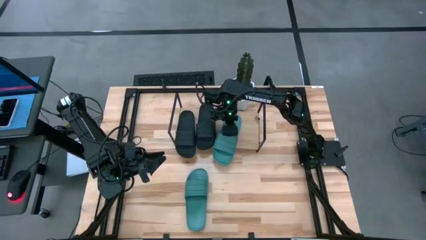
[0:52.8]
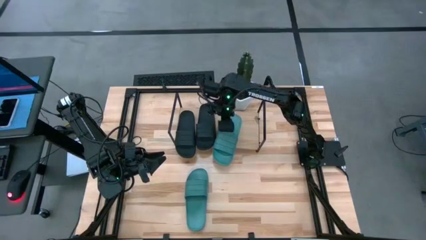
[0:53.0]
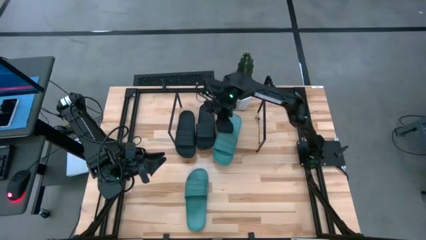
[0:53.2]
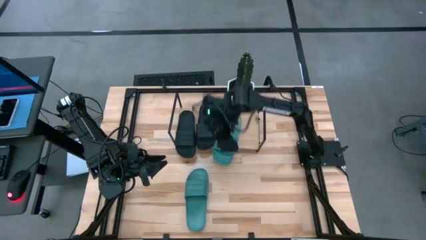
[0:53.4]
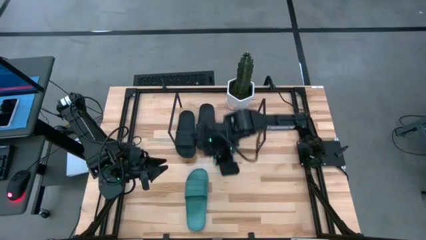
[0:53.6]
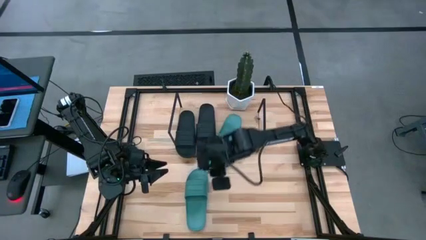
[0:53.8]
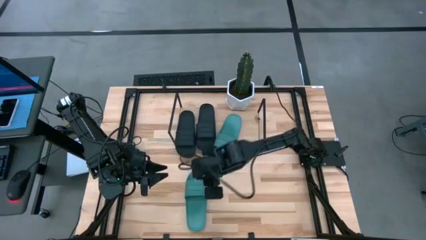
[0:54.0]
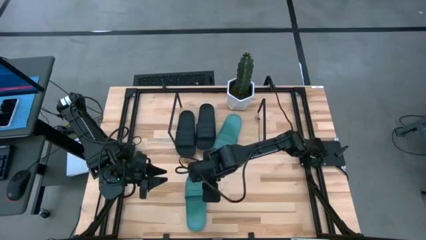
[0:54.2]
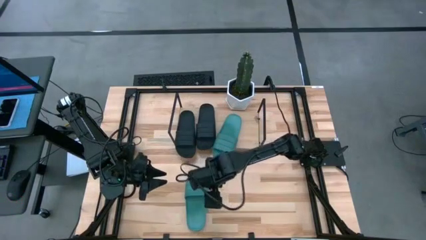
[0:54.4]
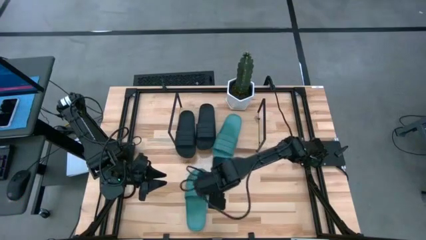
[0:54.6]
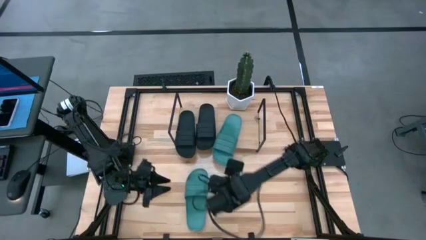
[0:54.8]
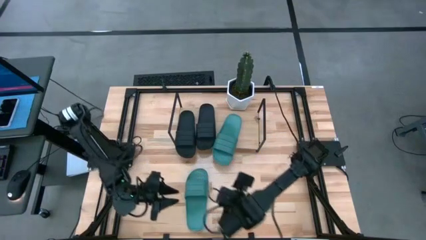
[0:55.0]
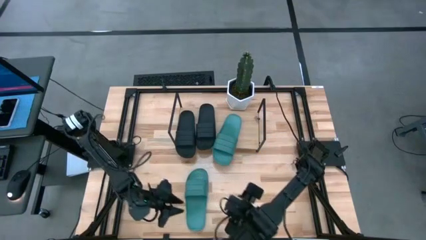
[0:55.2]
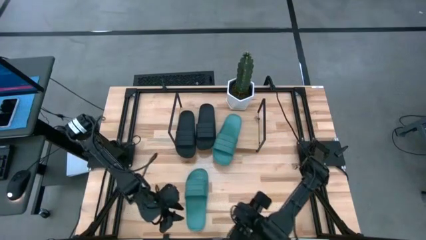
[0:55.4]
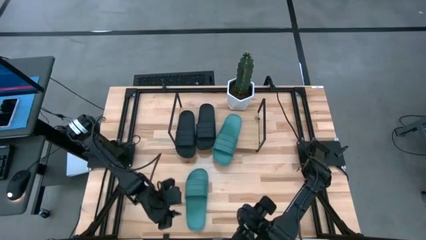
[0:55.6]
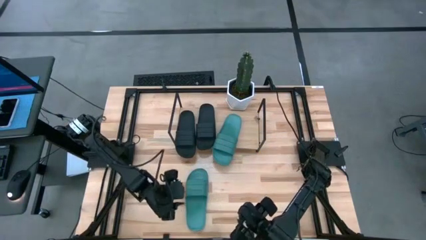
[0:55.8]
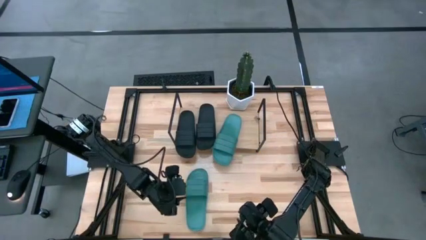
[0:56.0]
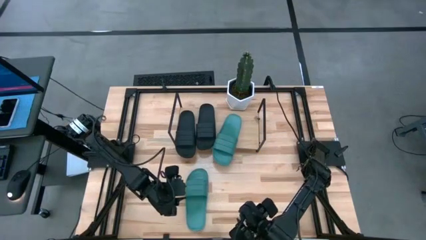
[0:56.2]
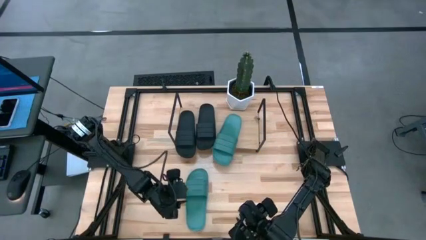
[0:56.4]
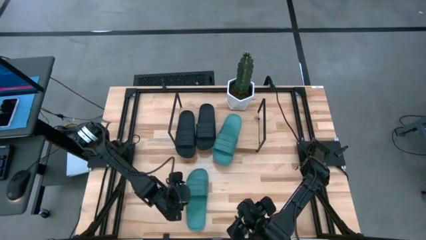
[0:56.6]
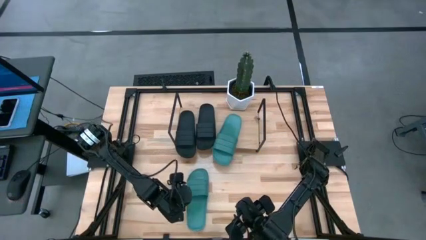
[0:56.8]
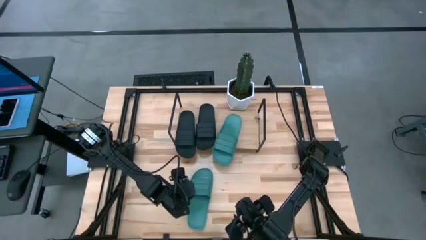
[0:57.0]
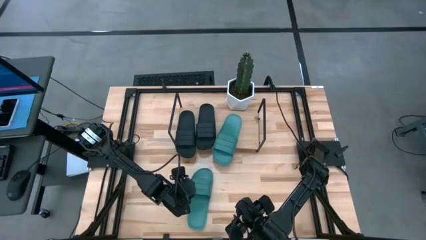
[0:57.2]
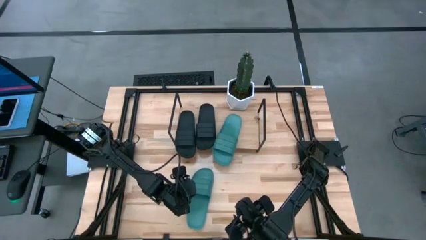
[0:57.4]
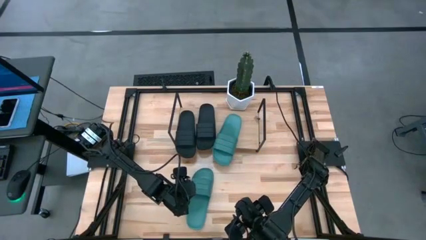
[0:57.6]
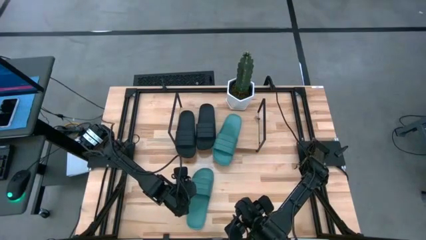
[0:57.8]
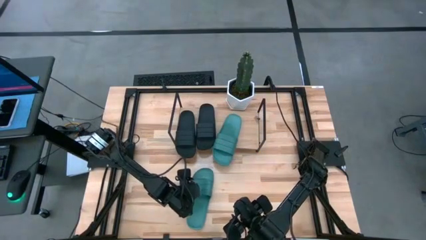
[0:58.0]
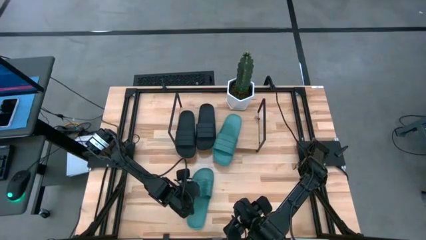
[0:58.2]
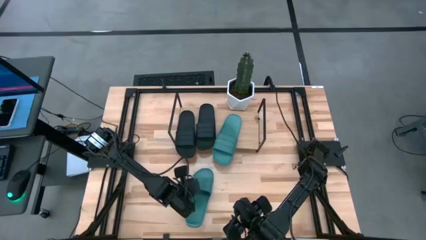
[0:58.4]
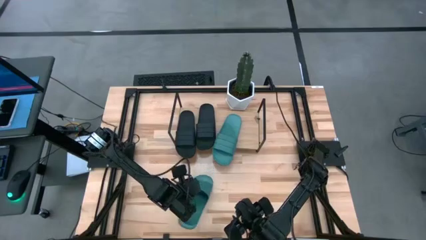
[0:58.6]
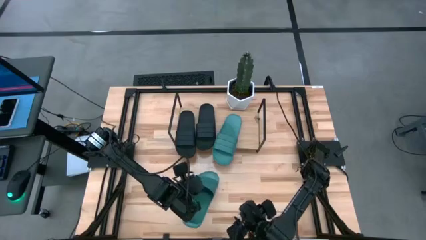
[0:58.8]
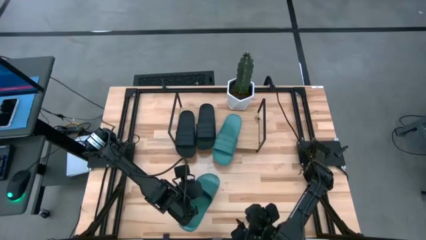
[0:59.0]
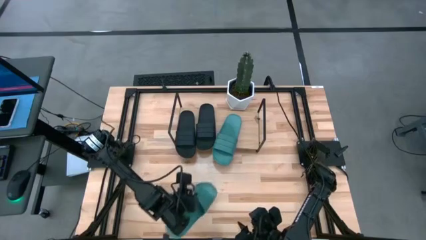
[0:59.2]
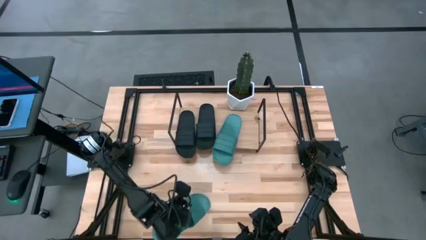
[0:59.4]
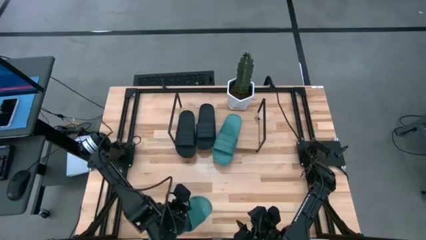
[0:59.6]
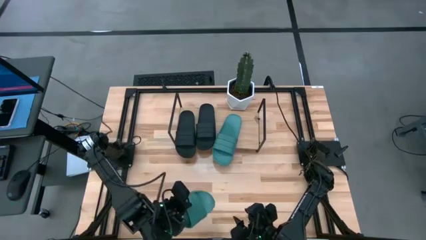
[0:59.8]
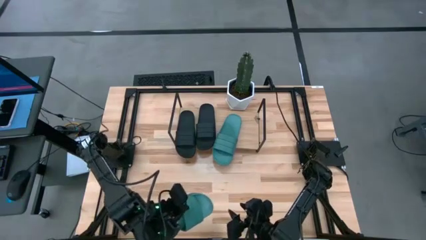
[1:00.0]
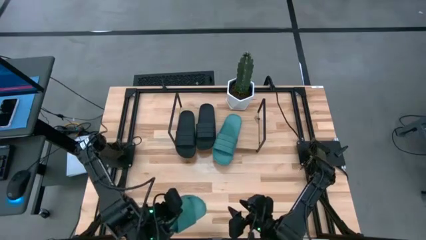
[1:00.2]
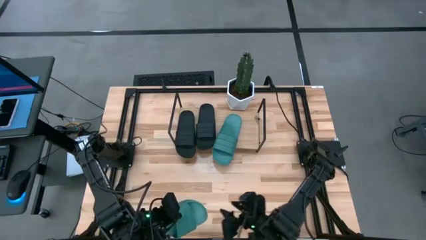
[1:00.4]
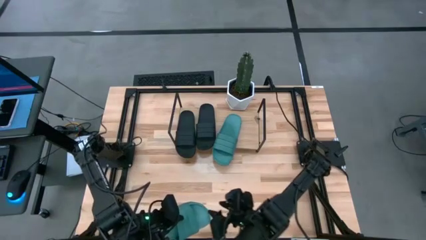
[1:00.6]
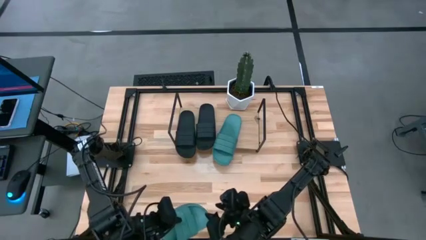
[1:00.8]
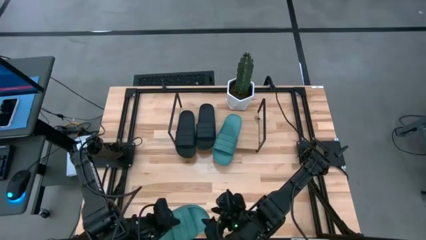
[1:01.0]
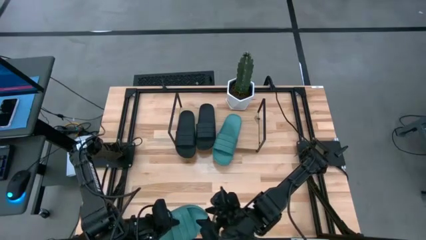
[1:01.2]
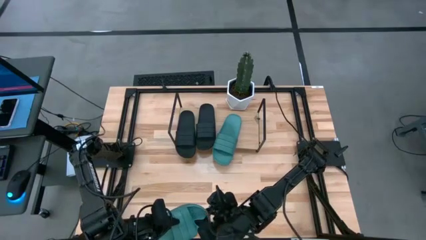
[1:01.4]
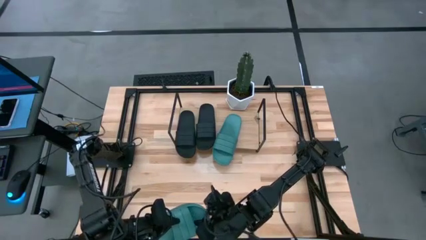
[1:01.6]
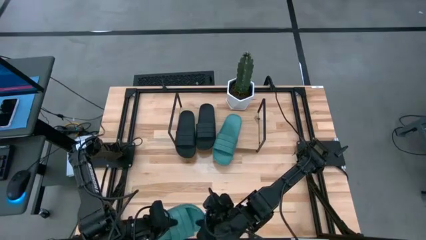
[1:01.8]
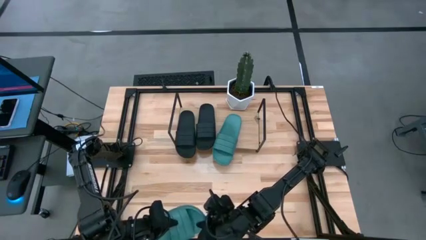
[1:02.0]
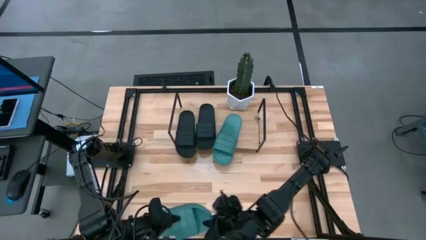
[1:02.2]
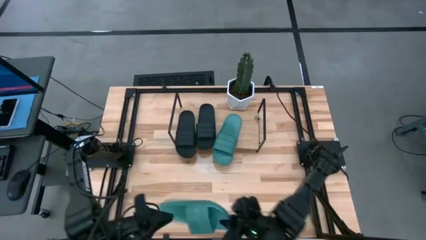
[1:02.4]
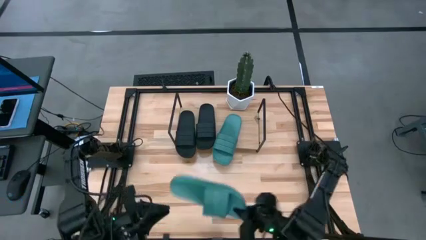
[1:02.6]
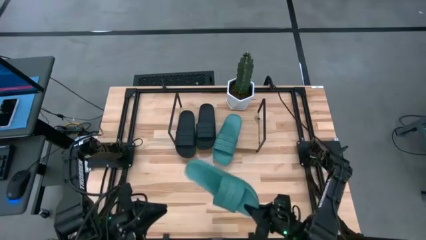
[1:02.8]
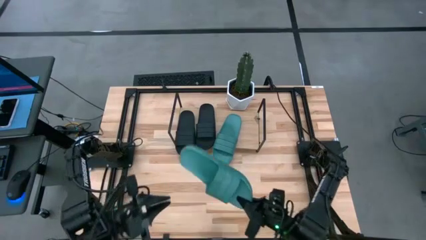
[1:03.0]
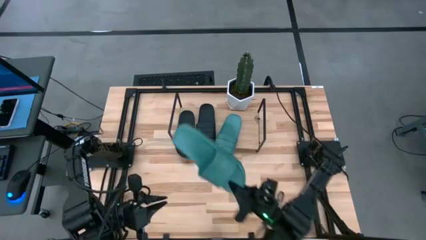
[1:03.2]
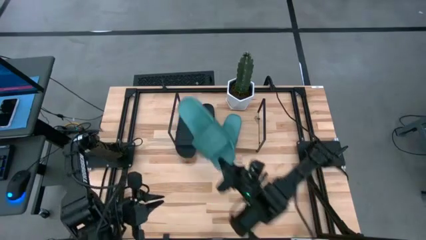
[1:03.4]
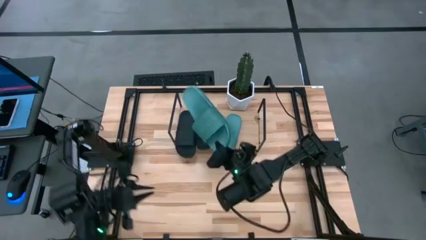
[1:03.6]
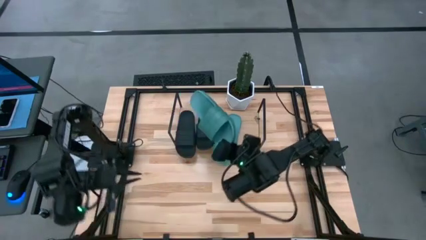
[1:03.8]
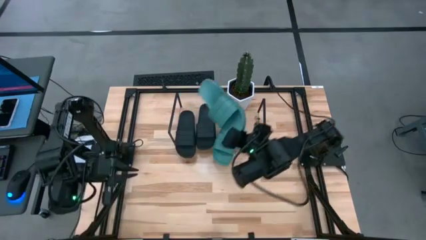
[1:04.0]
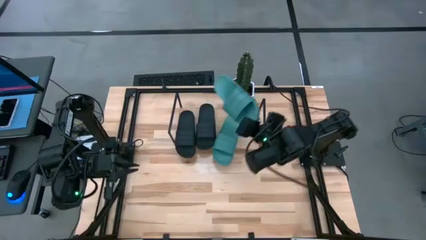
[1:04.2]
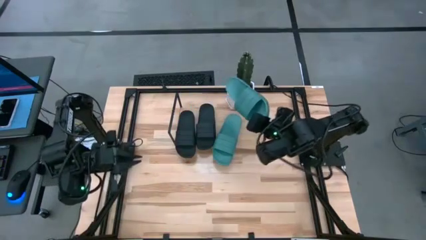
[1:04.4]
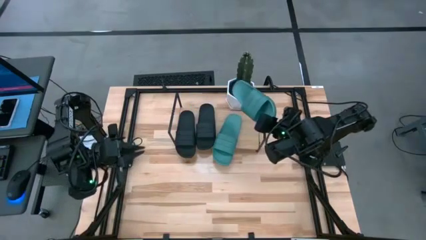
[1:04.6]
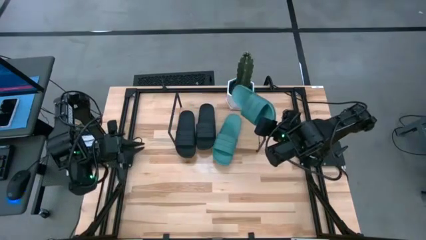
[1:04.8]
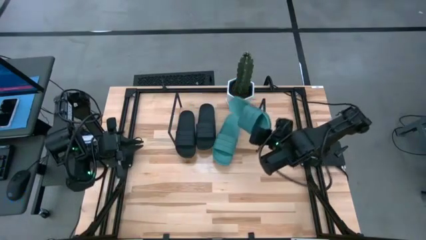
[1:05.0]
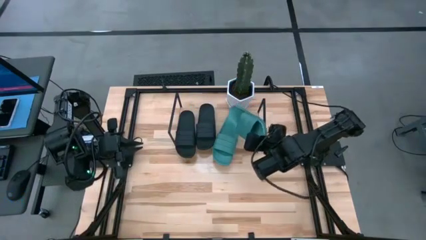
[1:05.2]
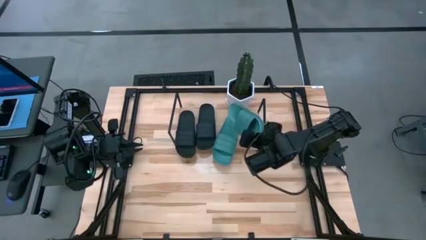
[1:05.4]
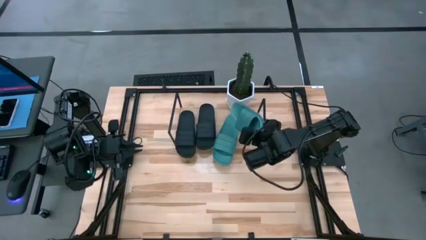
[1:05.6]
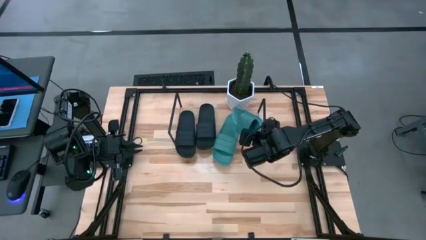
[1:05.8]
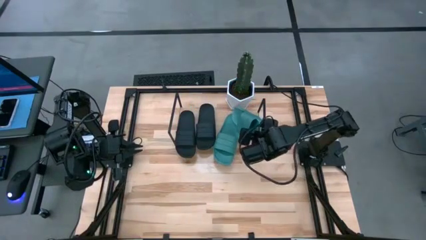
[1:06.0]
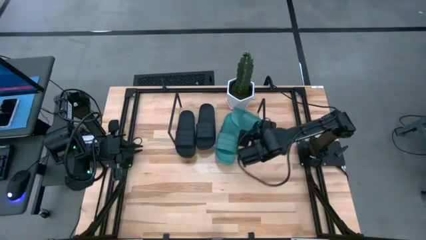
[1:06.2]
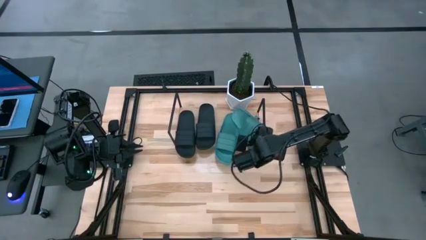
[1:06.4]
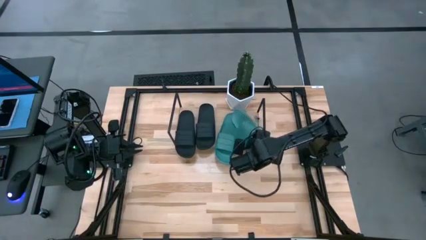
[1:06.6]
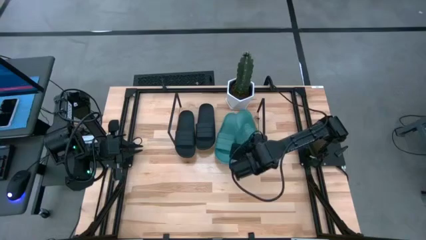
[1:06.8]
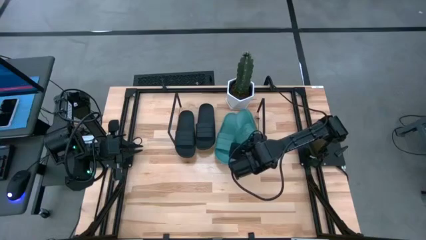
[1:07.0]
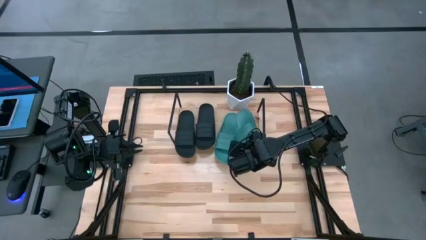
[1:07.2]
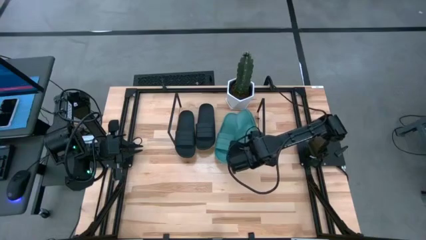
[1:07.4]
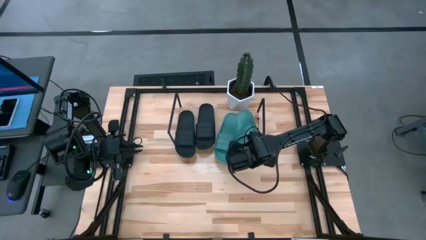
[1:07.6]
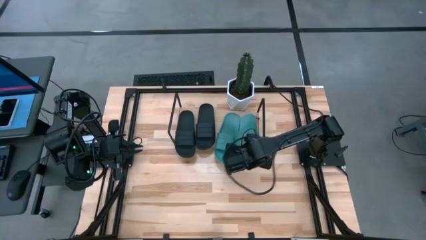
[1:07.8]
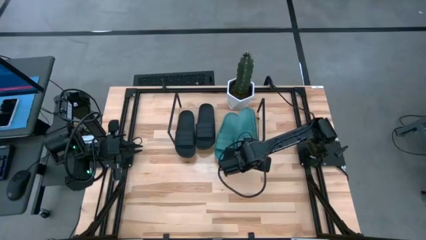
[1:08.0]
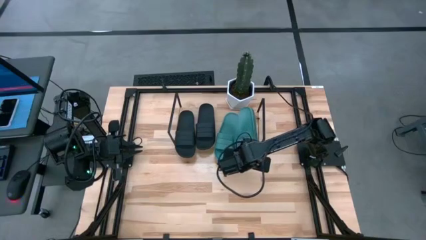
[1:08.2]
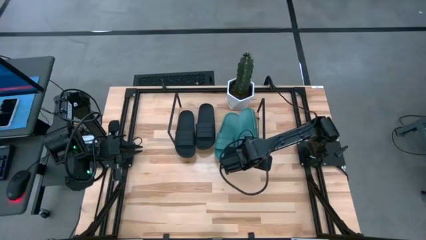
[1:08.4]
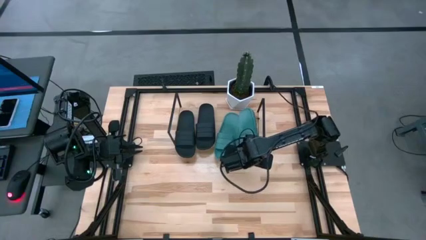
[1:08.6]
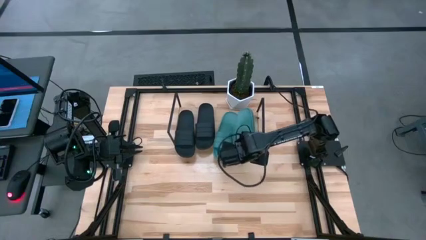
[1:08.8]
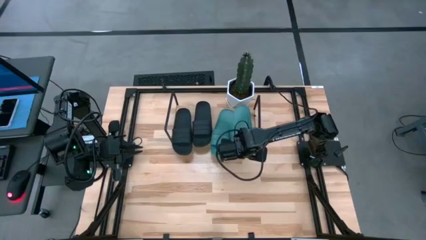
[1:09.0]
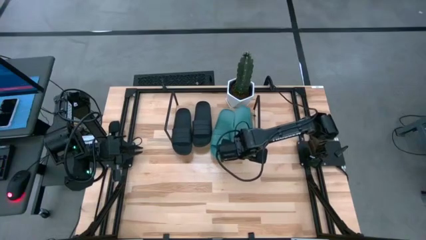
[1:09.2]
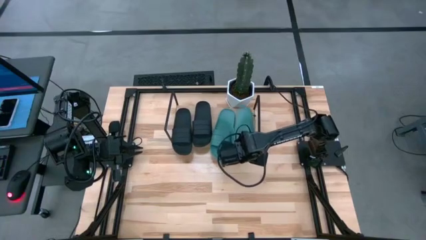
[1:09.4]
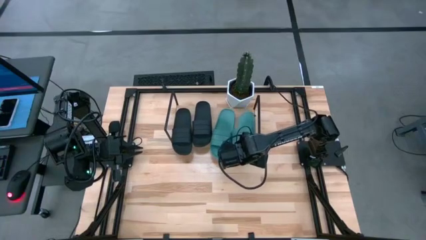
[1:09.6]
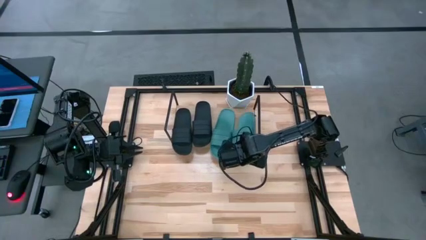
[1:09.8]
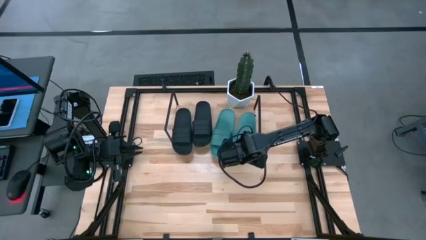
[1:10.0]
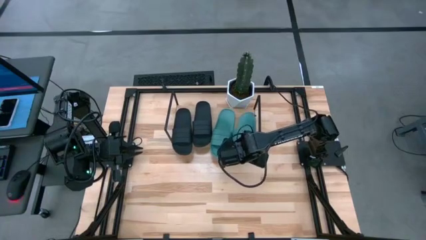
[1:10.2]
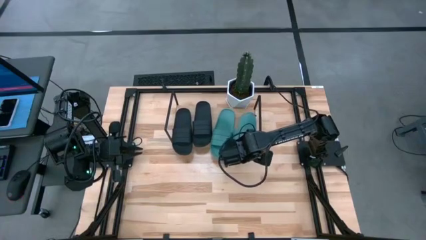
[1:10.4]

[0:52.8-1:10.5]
Task: Pick and place slides into the shelf
Put the green slipper on the shelf
